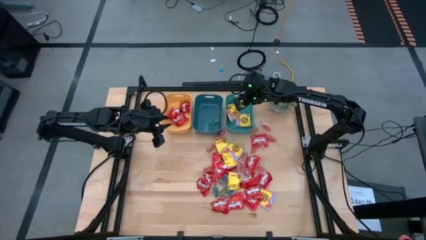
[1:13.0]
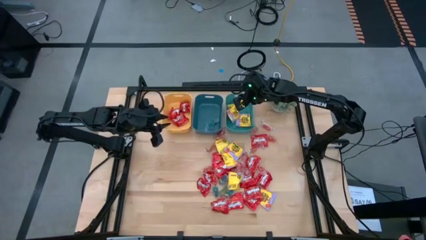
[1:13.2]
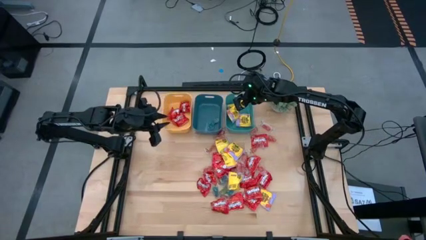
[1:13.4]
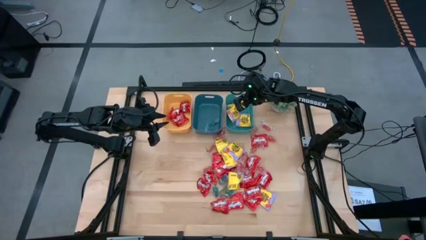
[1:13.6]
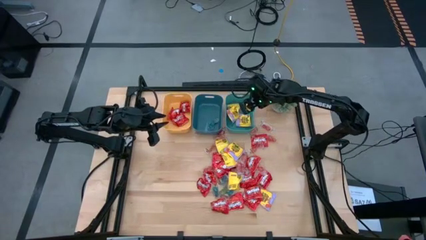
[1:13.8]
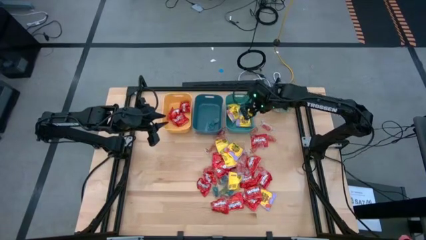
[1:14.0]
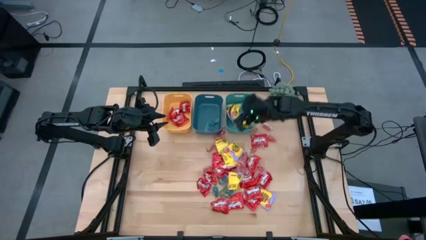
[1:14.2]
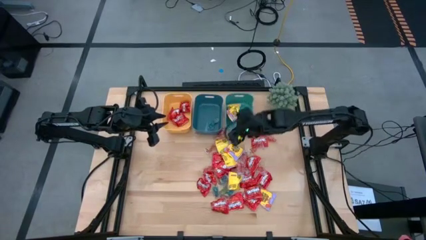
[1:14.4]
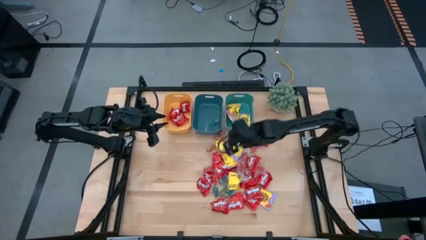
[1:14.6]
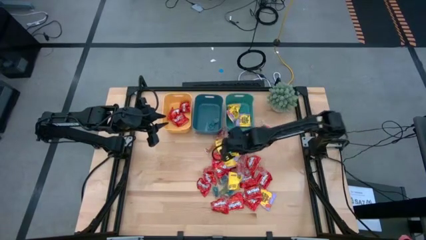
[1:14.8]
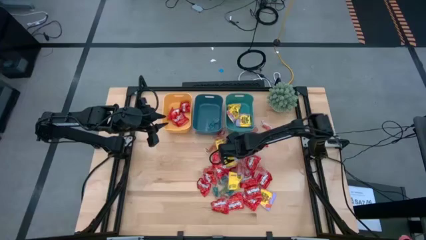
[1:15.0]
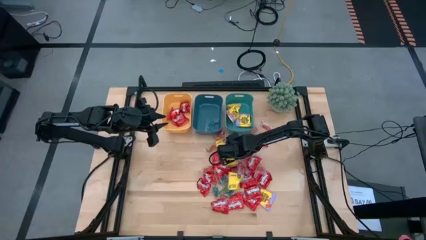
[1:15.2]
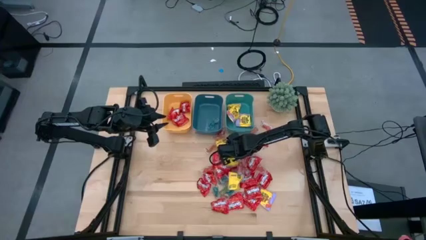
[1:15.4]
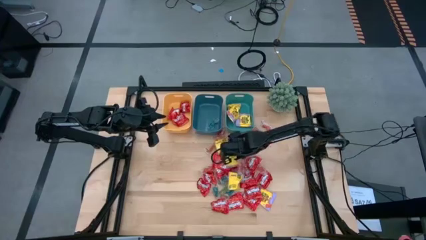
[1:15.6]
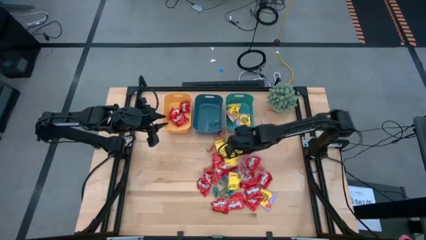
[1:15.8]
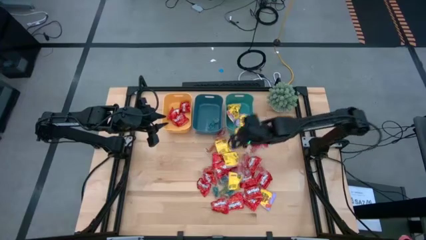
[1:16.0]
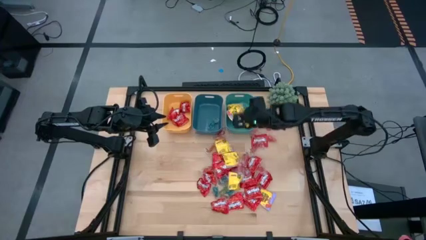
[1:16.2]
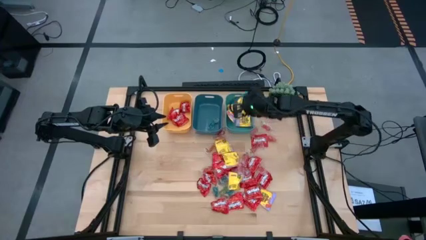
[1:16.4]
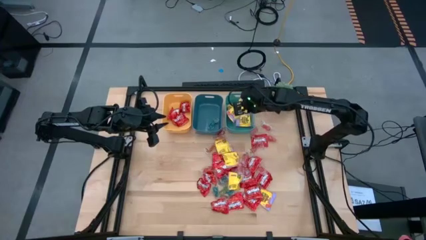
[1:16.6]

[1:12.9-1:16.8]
Task: Sort candy
Put the yellow candy into the green bin

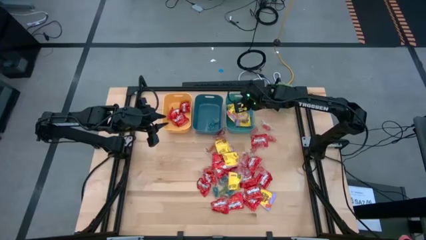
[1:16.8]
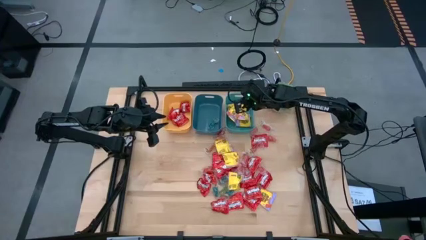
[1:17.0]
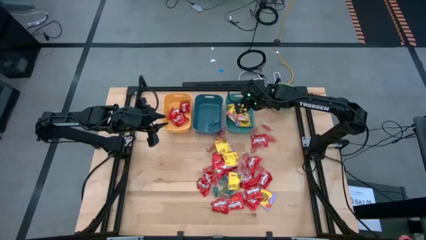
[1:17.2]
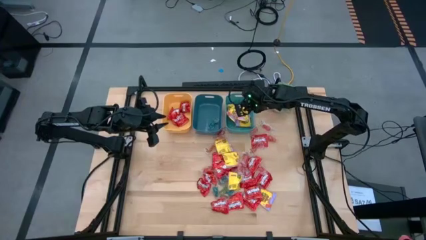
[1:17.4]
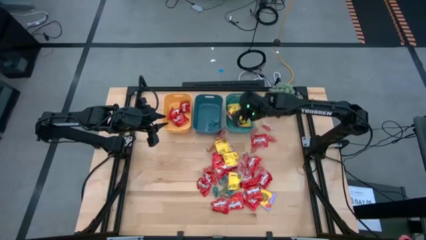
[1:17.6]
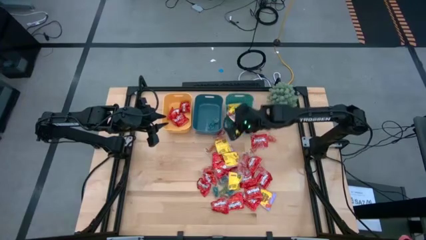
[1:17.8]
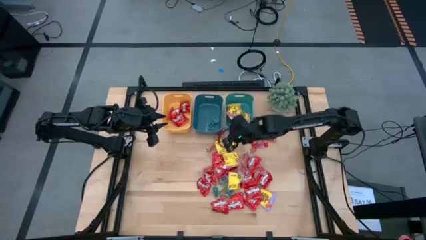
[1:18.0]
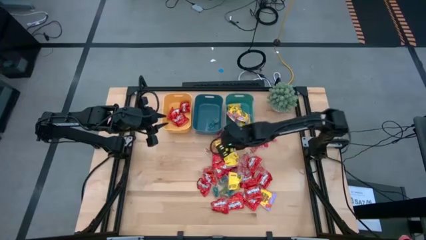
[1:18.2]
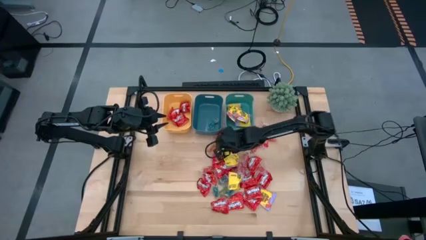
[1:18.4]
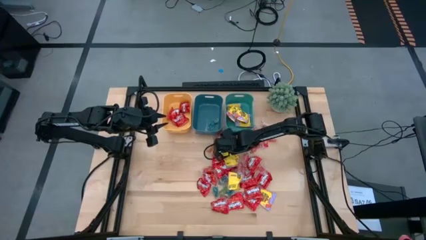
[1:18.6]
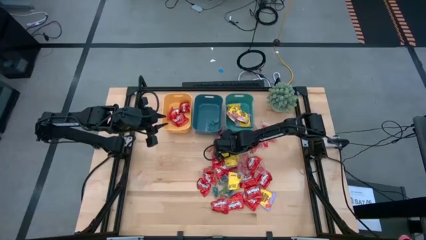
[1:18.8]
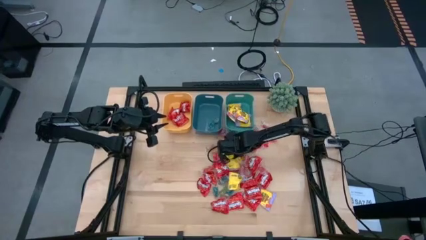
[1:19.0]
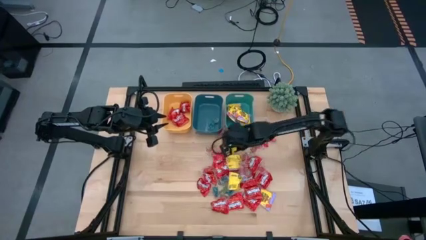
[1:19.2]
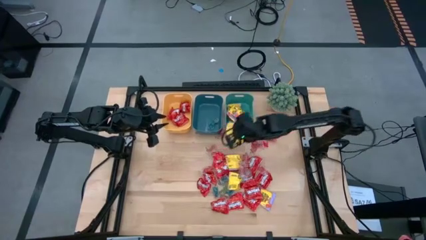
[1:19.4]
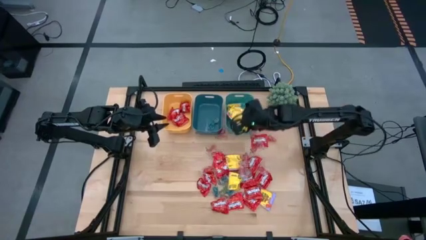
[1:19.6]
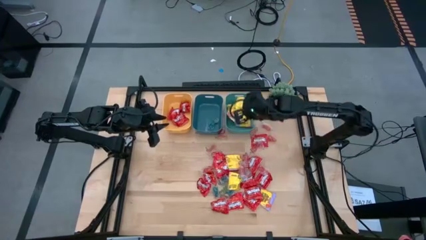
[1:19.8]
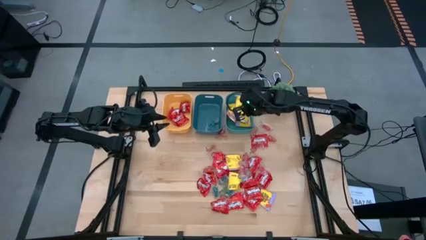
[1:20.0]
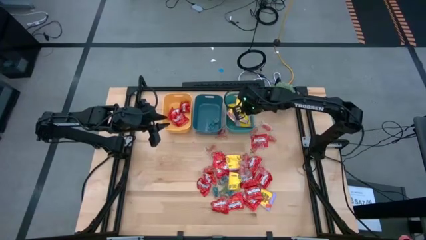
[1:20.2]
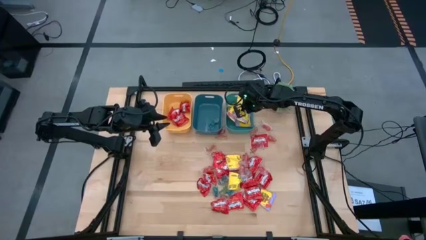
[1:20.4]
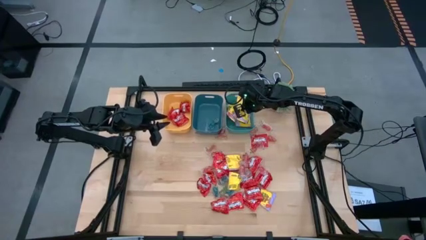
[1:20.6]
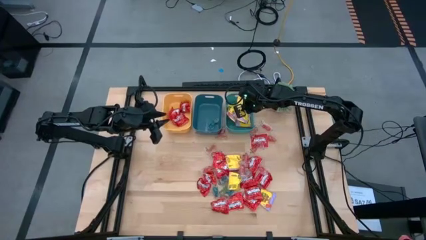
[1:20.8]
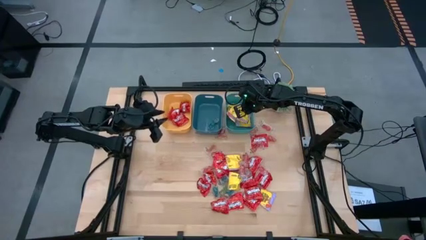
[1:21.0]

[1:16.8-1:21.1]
Put the yellow candy into the green bin

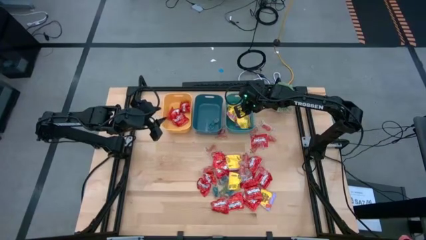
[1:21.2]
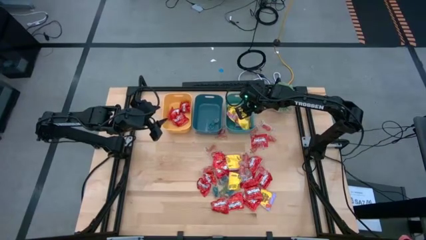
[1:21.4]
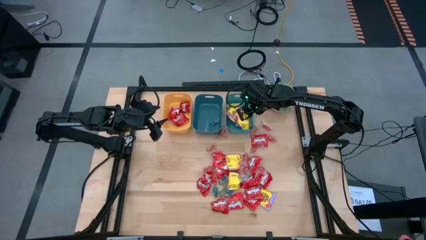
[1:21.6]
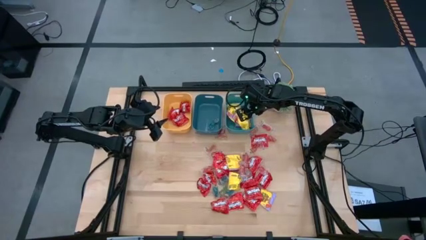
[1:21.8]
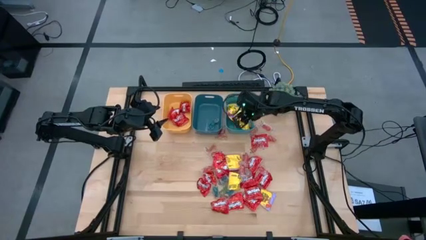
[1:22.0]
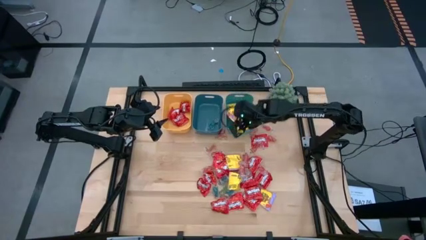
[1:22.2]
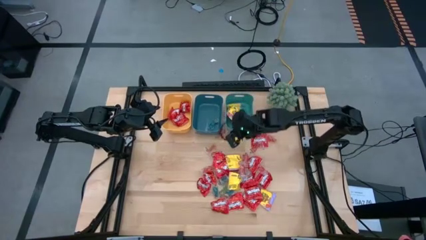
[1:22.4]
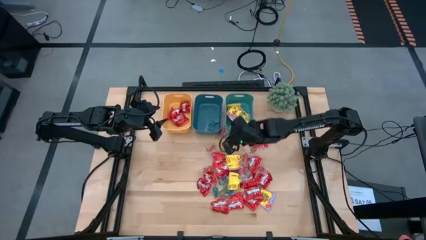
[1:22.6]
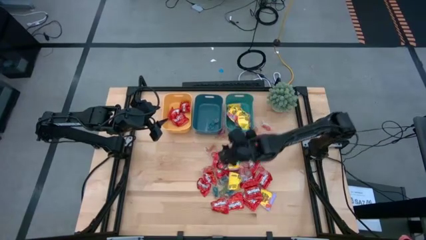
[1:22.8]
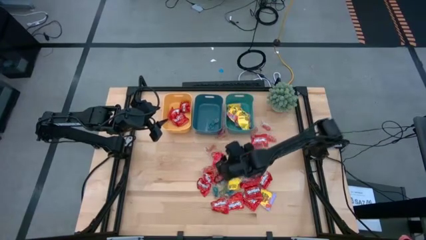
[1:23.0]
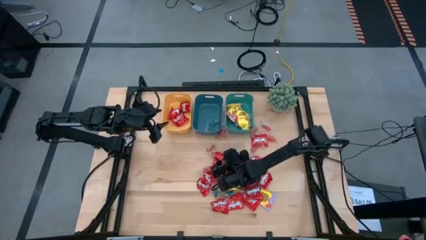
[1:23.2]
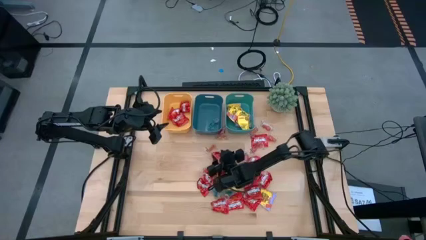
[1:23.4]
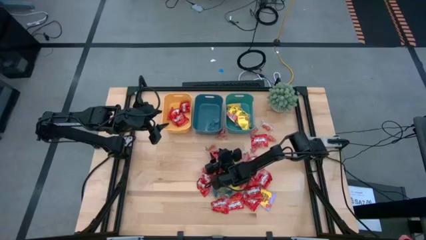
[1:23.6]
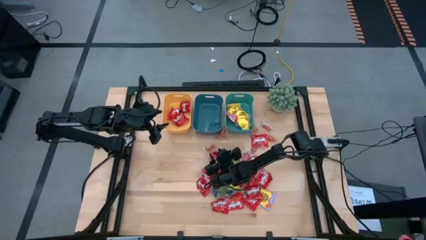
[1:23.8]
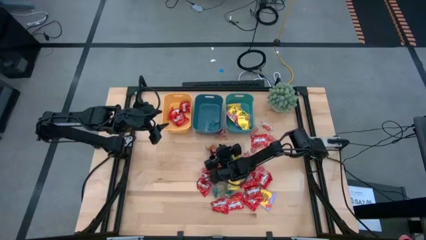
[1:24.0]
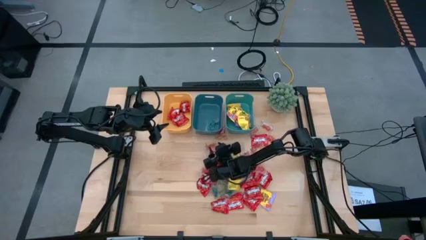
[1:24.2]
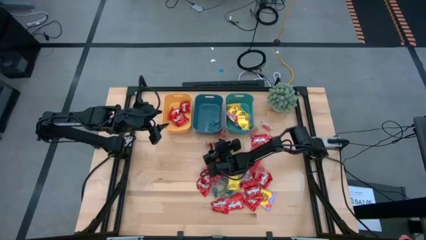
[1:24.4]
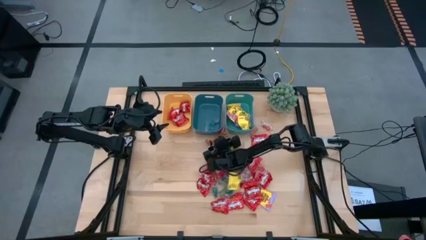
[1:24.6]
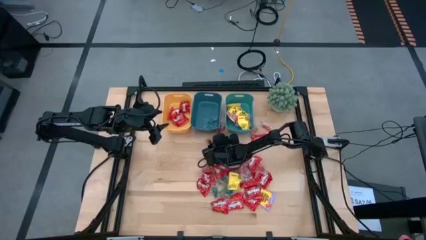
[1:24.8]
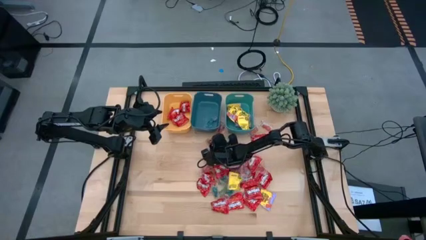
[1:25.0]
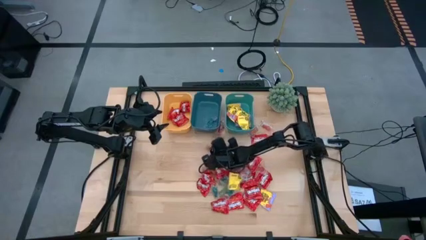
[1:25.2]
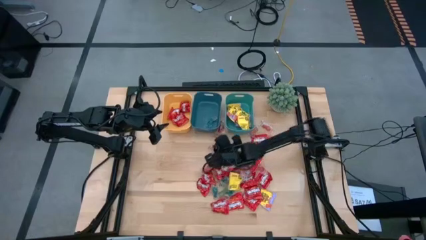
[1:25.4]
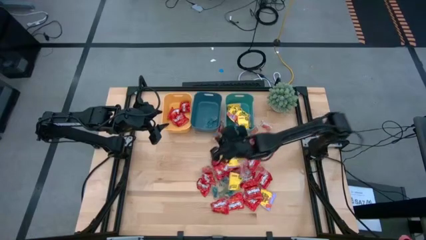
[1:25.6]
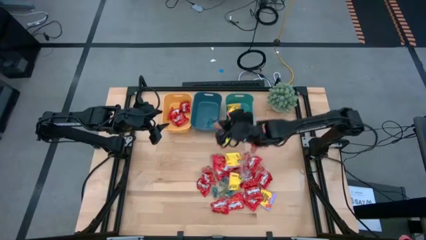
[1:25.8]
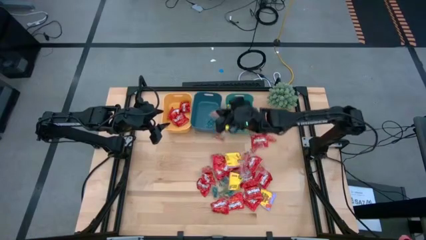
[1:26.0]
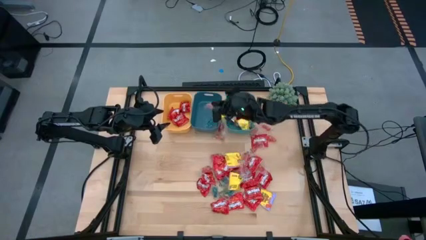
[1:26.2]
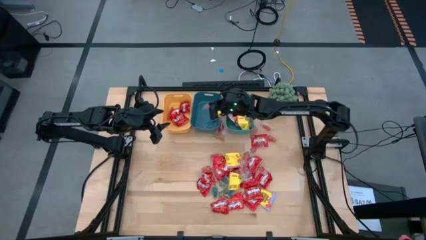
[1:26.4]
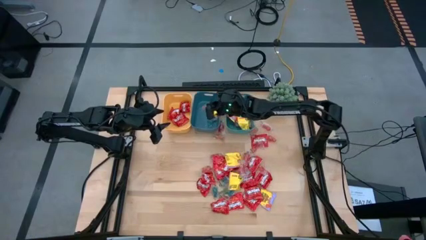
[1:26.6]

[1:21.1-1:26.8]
Put the transparent orange gummy into the blue bin

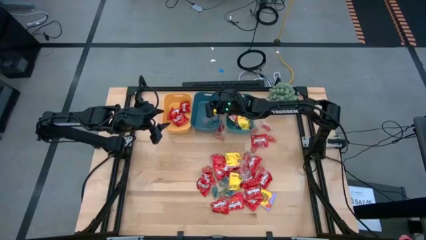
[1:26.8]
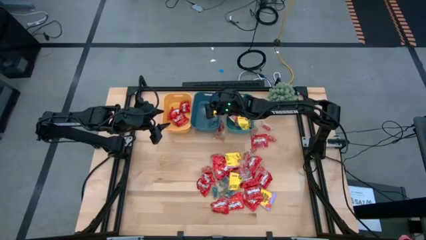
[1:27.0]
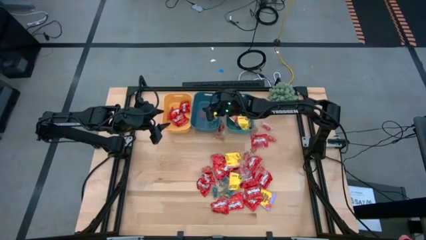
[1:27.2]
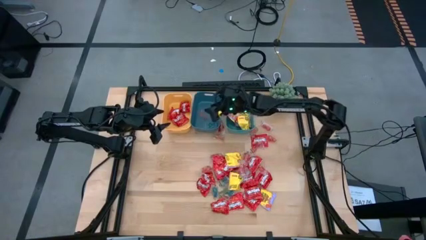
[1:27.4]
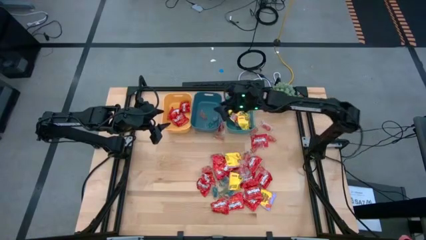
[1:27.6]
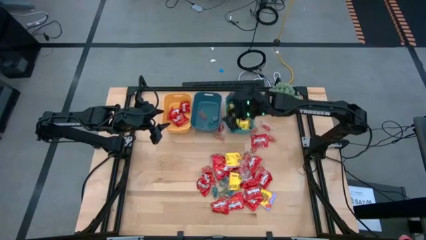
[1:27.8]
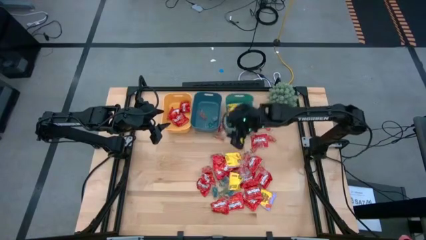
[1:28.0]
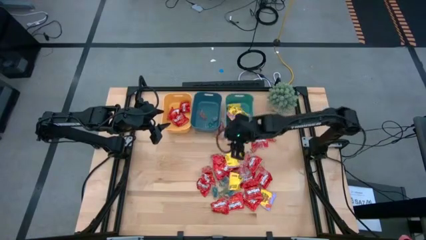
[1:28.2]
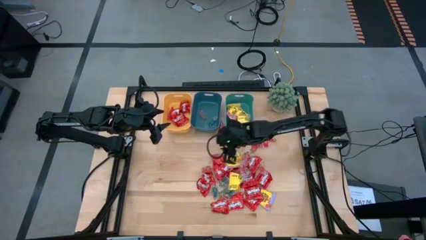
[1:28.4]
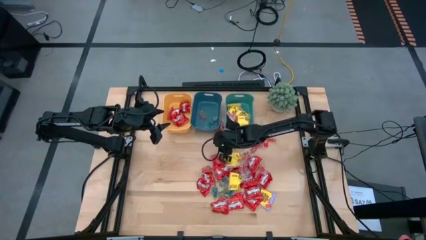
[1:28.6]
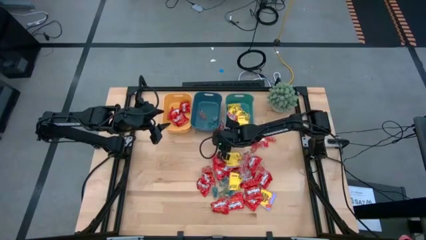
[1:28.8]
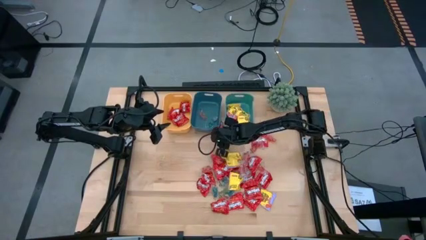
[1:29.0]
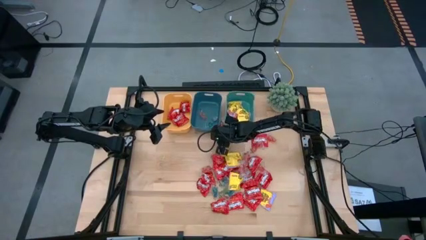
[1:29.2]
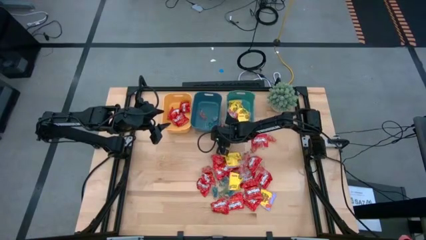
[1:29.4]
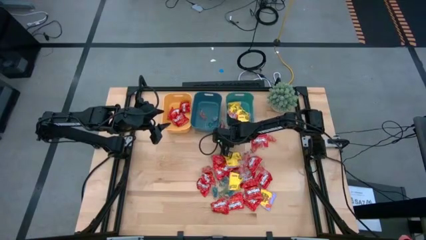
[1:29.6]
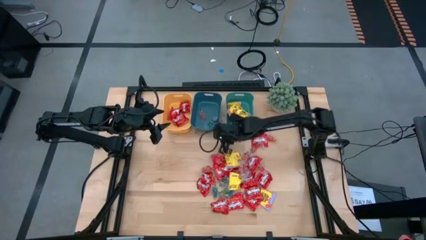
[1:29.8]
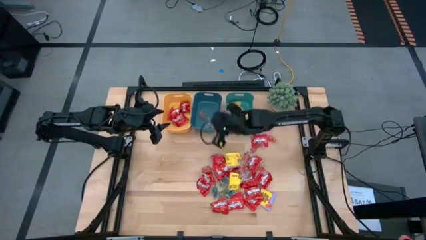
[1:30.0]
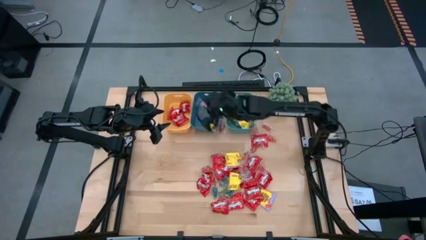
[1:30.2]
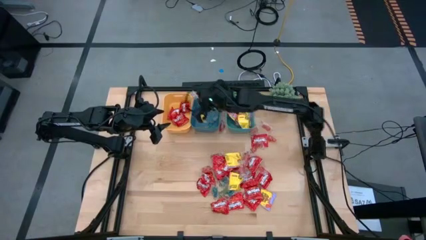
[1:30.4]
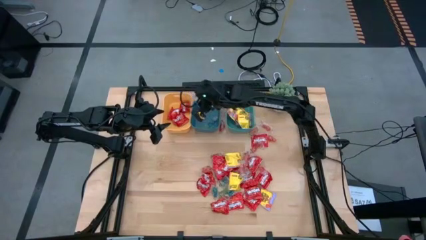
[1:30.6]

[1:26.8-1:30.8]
Put the transparent orange gummy into the blue bin
